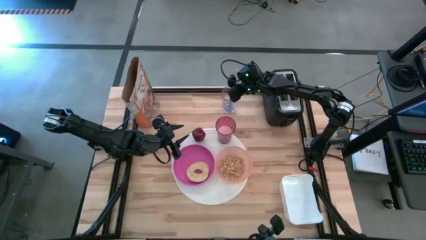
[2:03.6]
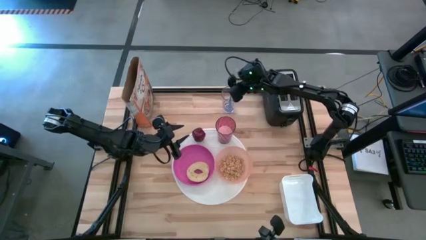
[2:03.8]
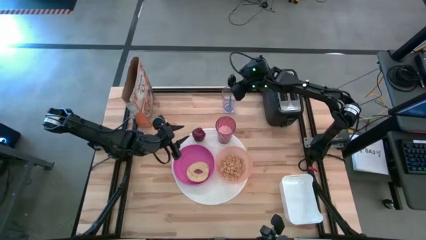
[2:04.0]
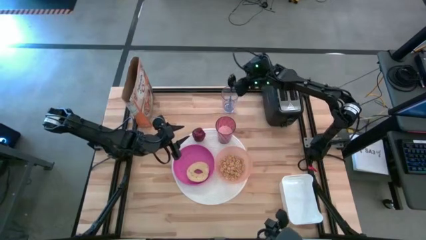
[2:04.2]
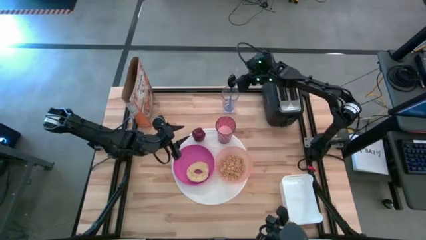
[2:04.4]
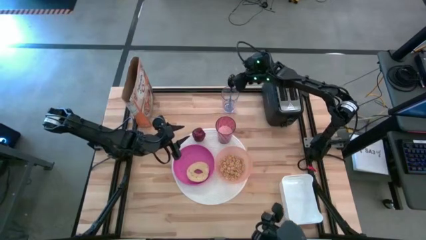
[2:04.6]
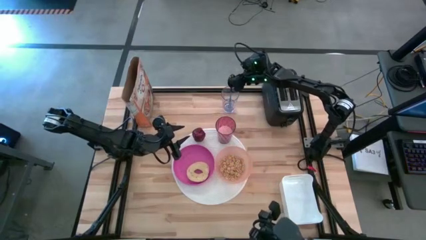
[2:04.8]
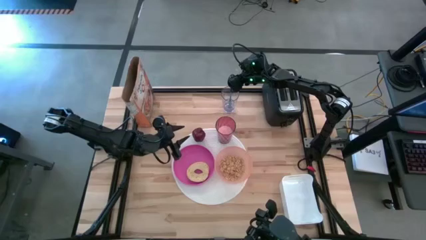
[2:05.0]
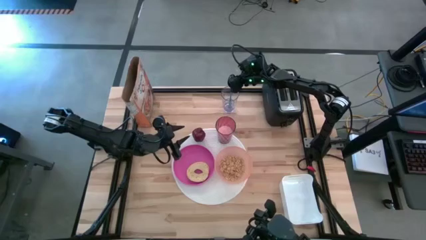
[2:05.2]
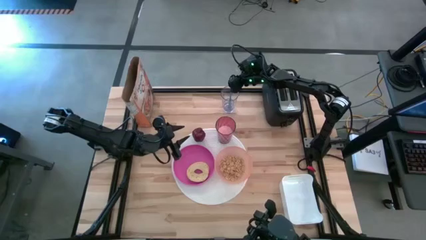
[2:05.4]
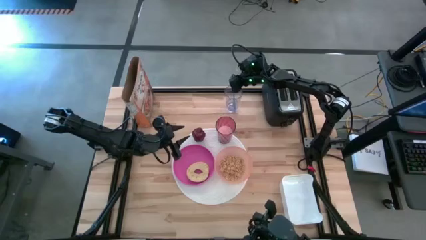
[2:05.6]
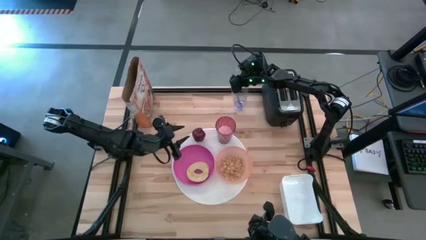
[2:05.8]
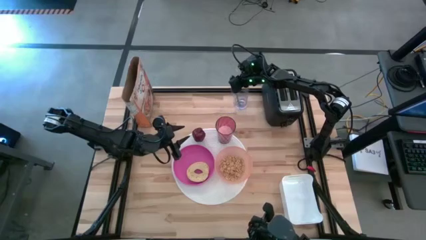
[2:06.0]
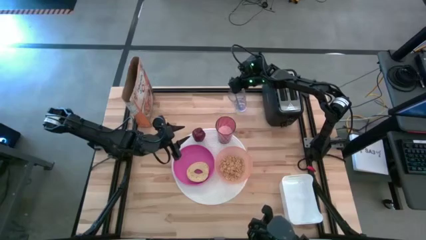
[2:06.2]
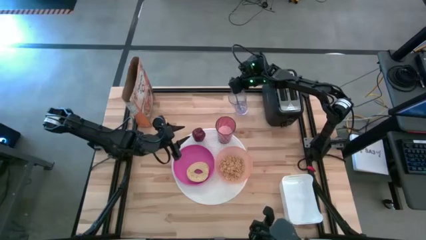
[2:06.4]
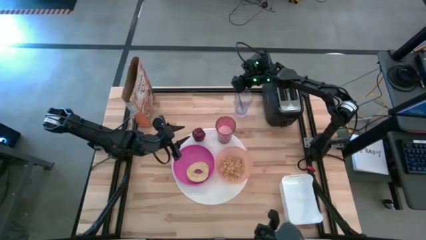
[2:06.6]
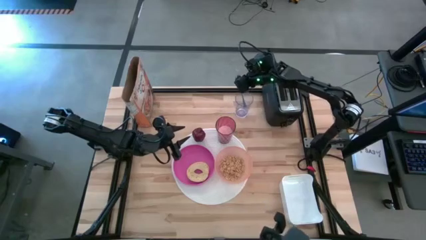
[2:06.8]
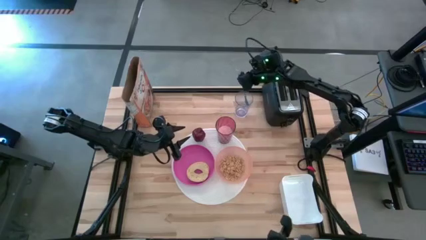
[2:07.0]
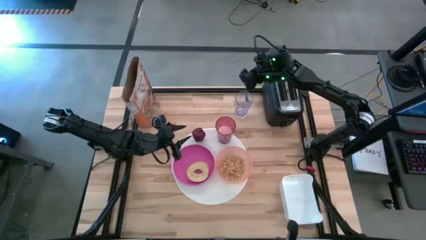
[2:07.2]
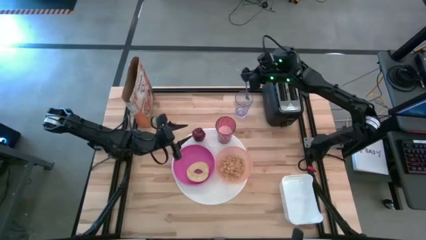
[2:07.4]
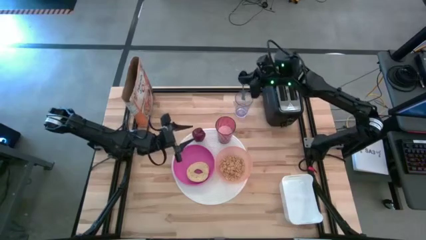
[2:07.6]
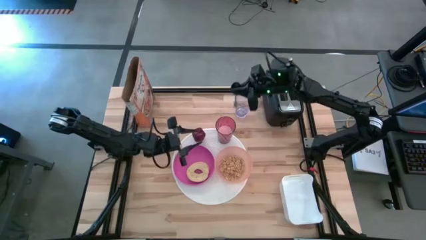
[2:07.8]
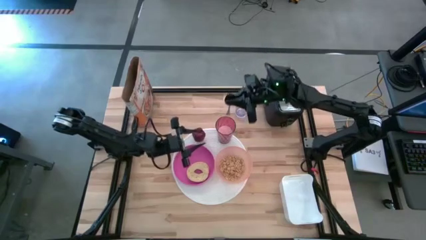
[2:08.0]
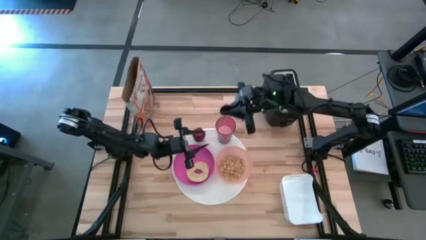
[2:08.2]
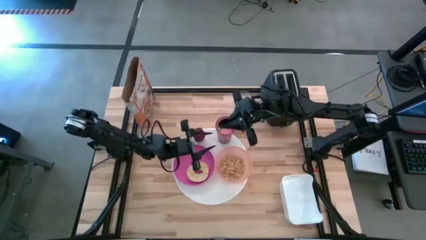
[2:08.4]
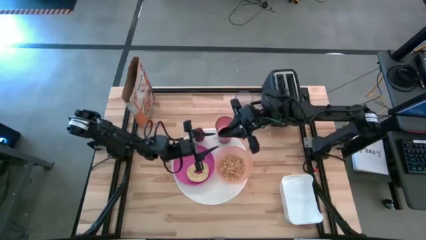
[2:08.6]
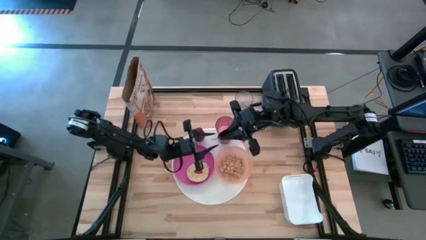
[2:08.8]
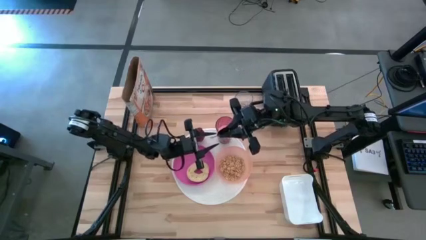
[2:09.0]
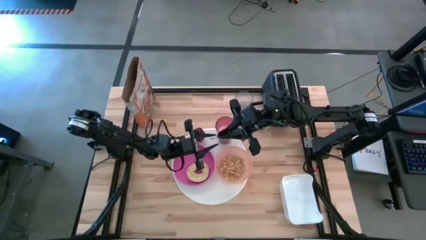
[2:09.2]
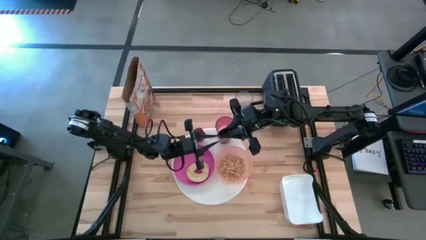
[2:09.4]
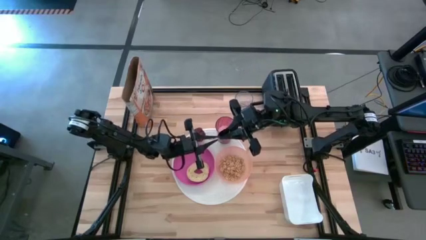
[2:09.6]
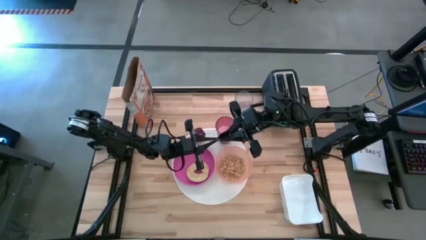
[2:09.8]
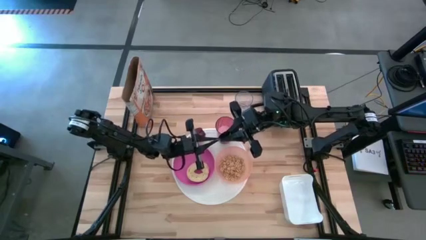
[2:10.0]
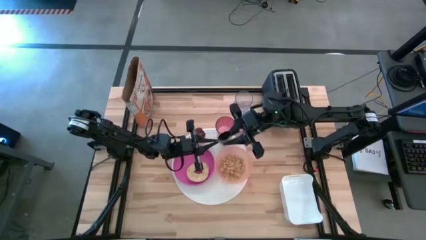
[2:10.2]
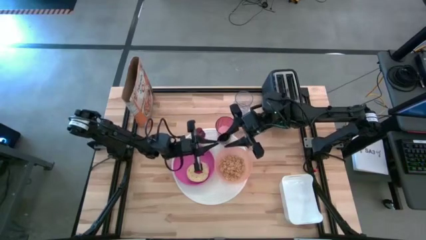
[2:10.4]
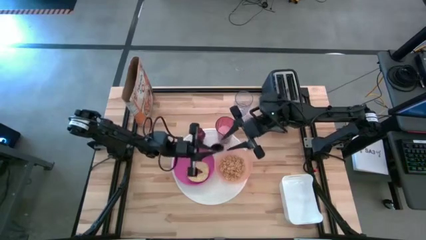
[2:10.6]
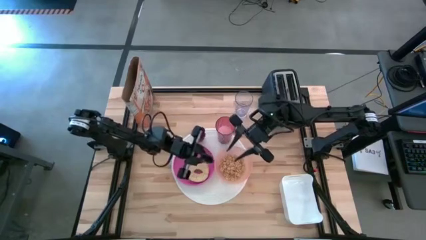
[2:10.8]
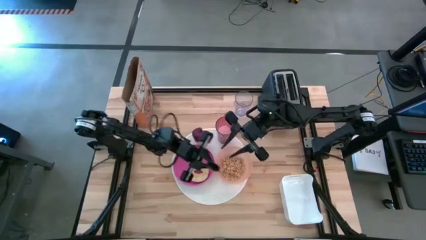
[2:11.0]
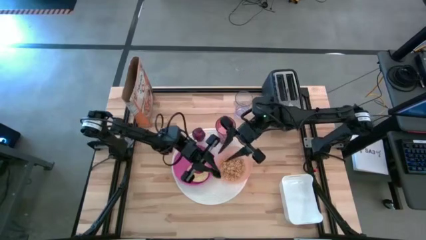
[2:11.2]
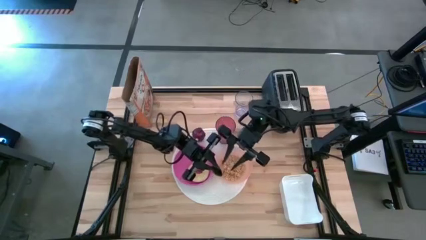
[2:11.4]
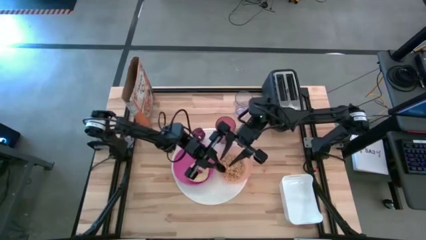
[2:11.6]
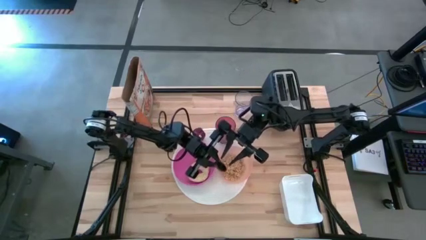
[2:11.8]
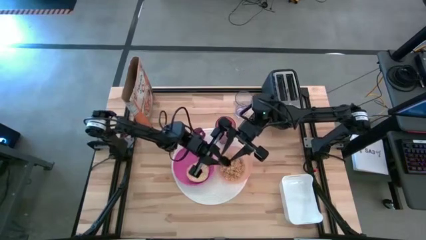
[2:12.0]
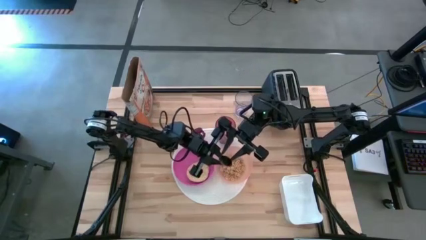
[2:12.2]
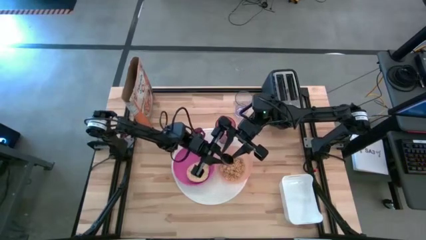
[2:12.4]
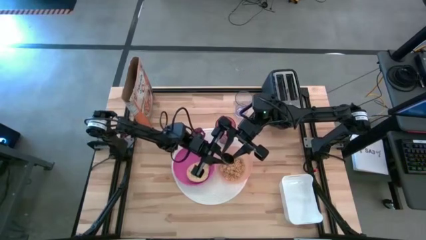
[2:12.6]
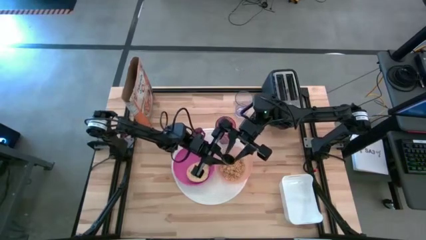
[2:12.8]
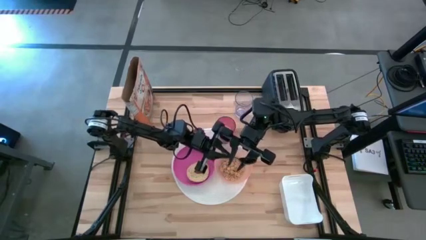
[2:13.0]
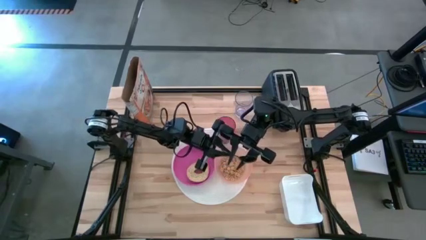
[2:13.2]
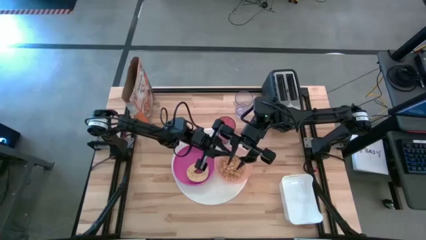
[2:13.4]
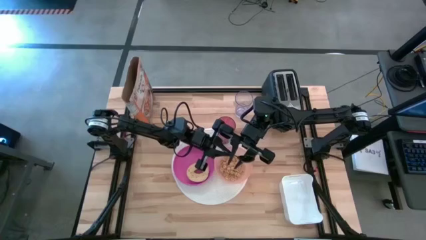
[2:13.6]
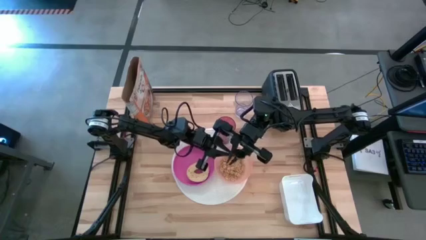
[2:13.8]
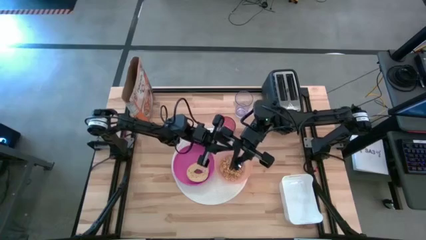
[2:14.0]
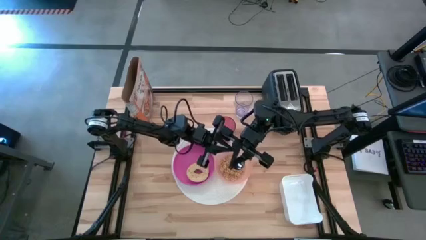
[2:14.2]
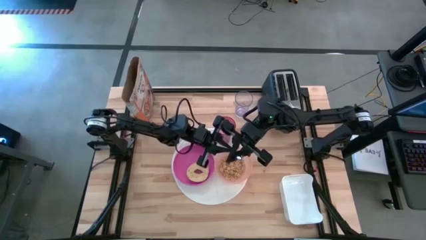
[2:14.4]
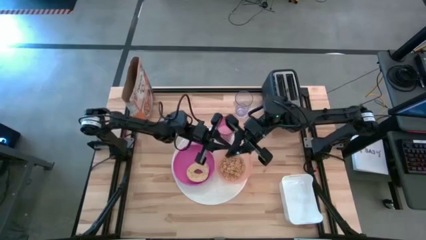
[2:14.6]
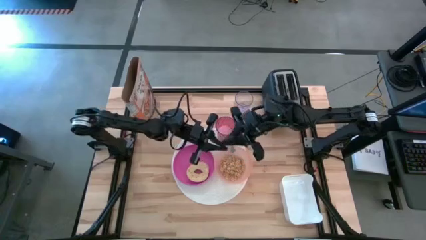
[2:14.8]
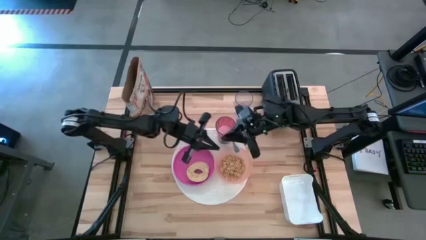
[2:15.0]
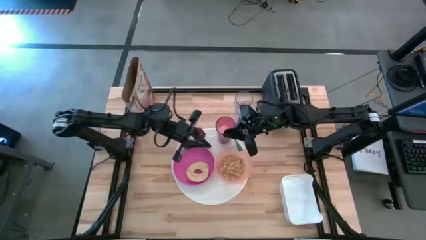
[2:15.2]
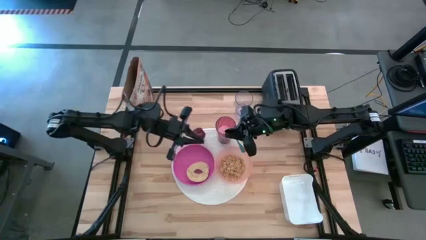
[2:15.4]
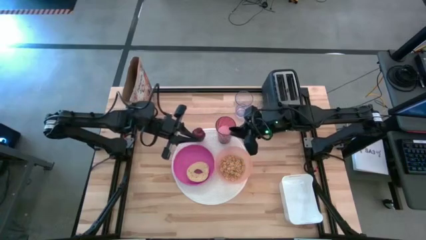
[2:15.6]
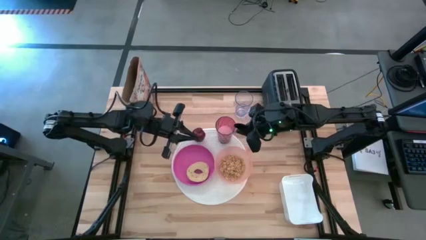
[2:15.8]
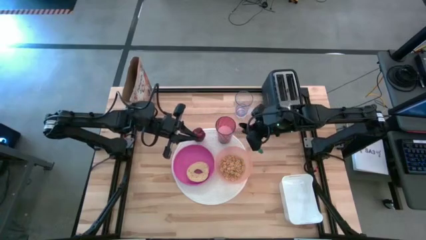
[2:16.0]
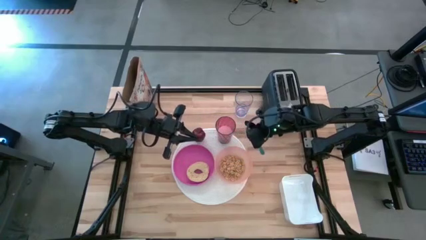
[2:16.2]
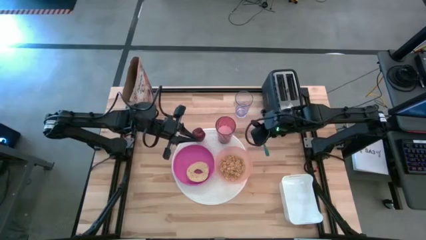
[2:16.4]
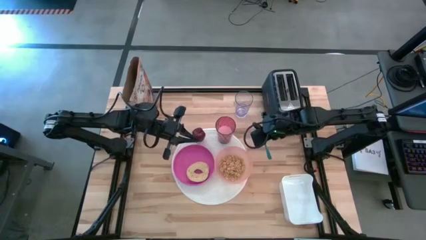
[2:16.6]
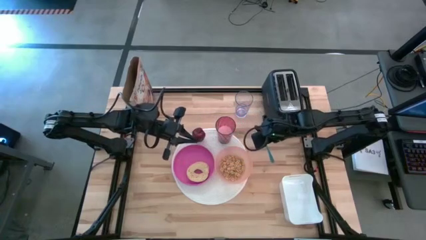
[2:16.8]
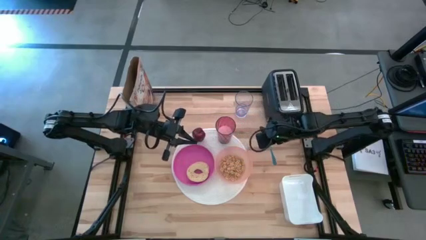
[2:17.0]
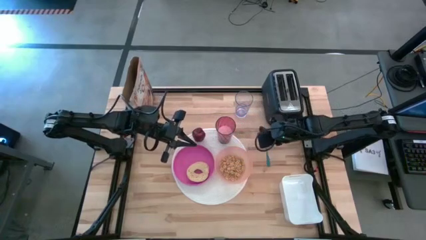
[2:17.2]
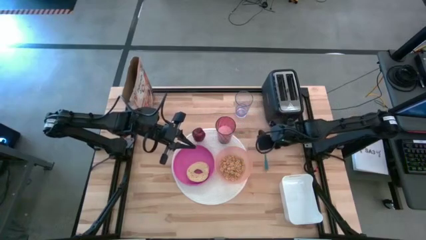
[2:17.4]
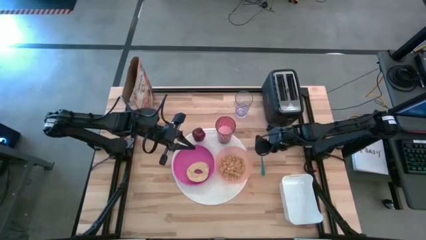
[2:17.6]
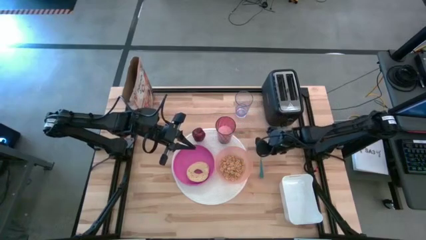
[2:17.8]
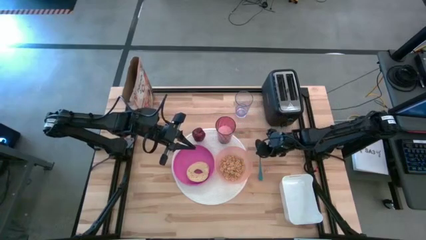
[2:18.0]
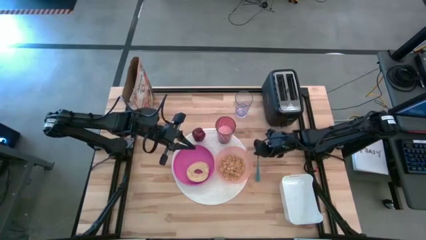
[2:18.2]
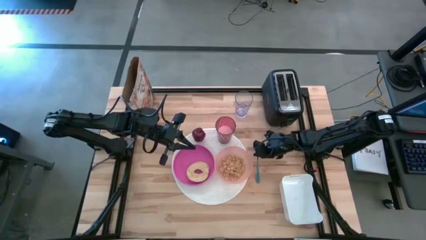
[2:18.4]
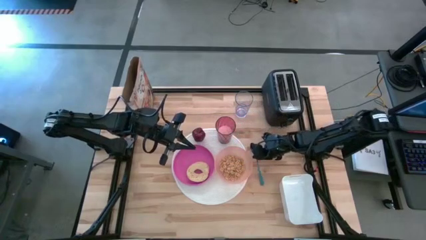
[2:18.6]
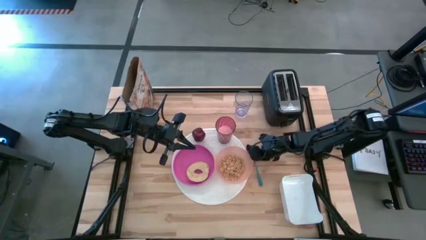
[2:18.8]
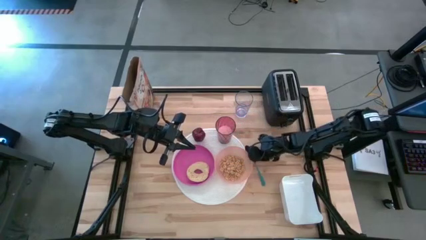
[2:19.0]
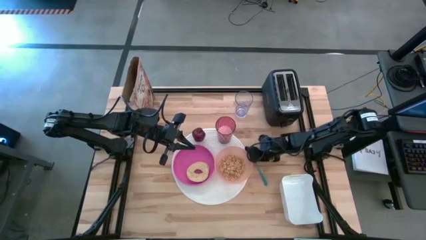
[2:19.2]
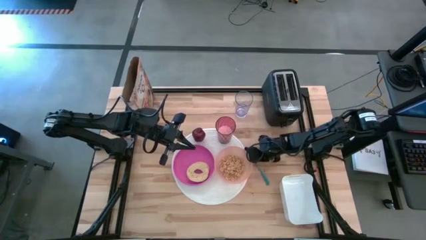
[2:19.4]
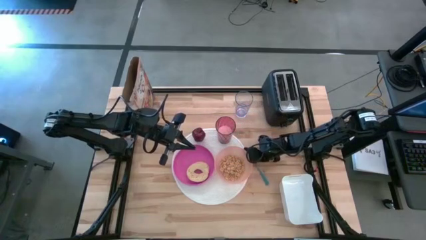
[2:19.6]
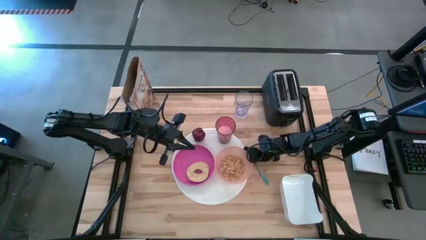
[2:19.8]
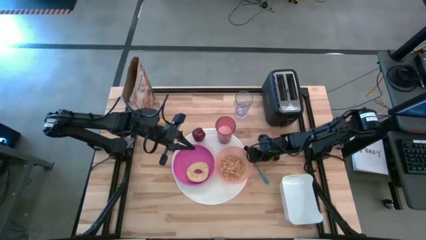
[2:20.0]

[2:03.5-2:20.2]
Task: Arrange a breakfast setting
Put the blue spoon from the transparent cup to the right of the orange bowl
